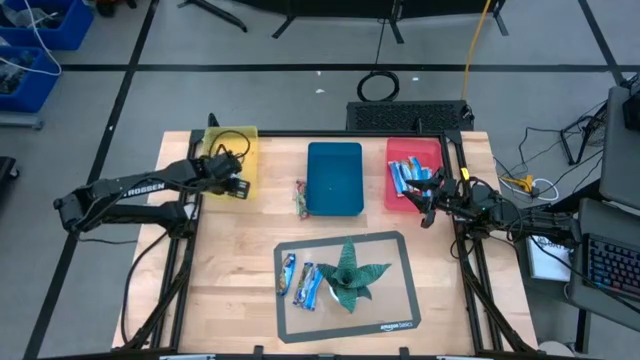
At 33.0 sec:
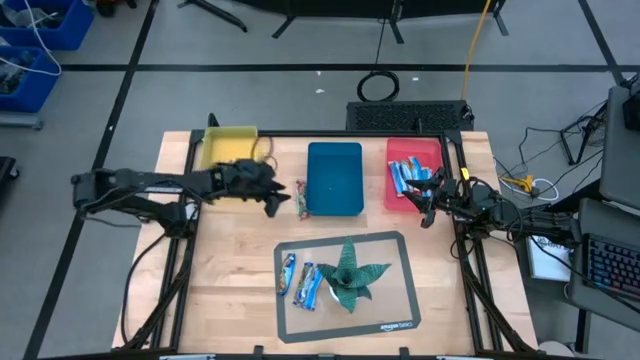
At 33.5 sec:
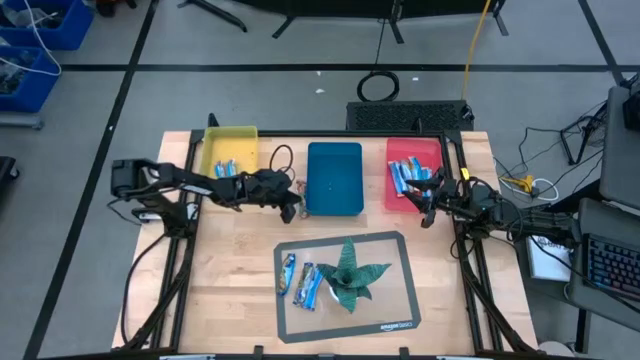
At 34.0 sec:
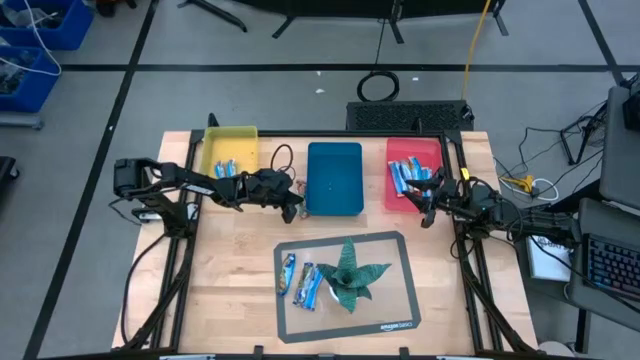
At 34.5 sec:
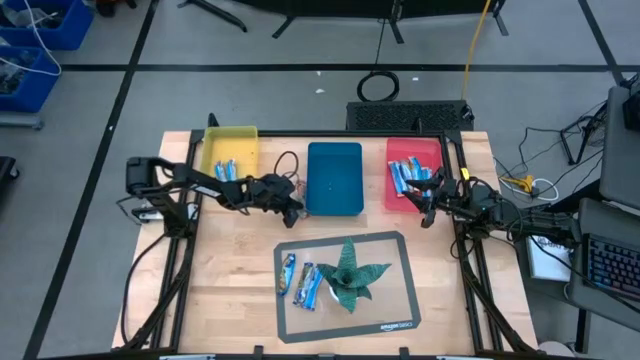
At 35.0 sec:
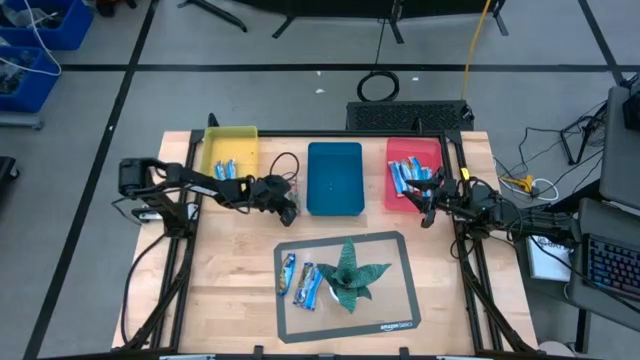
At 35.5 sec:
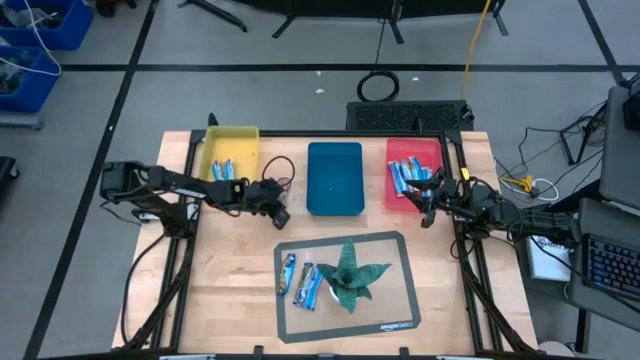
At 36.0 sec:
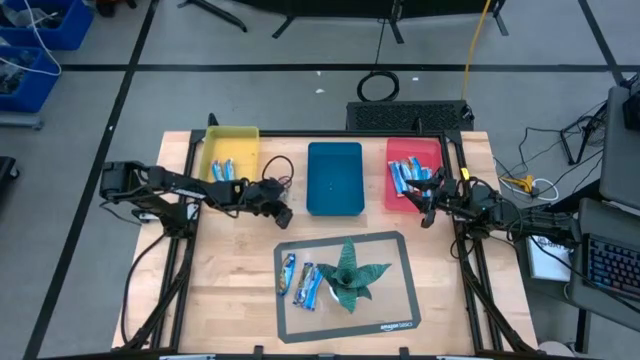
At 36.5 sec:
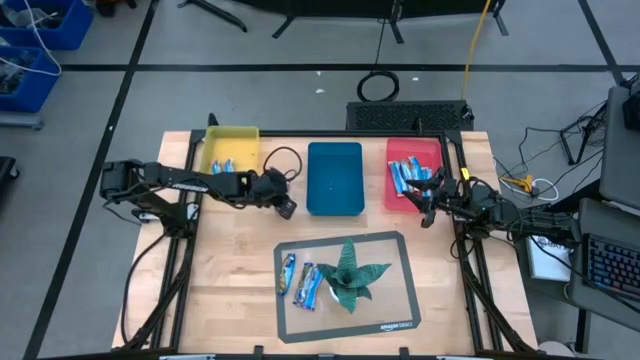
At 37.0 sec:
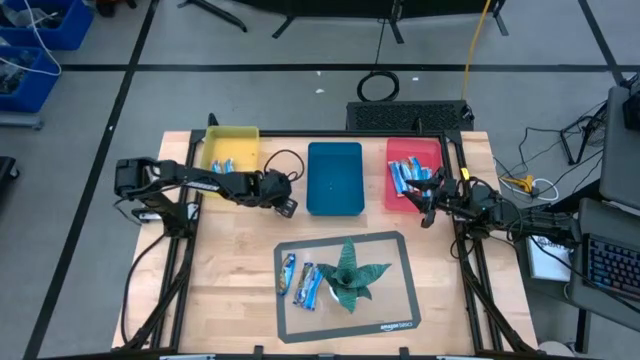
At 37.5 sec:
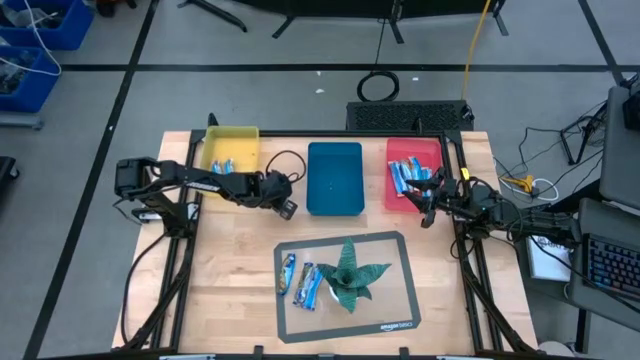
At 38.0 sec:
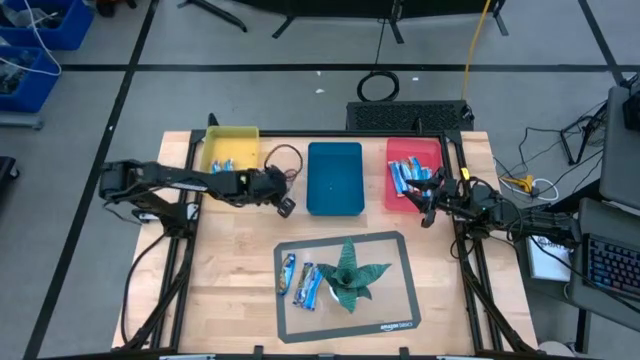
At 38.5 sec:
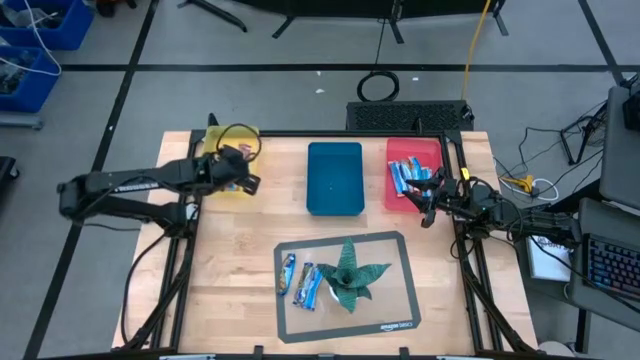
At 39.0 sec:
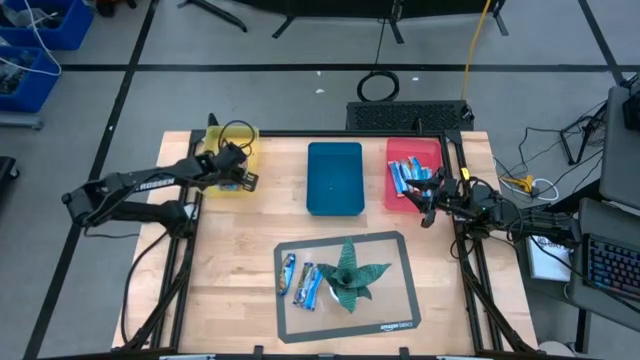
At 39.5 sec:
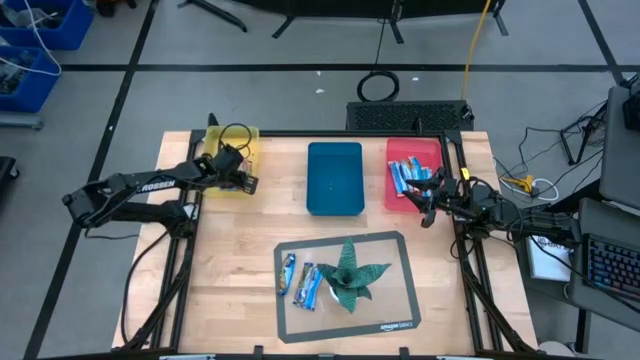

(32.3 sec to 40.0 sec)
Task: Pick and place Granola Bars by type
Put the red granola bar into the yellow bin

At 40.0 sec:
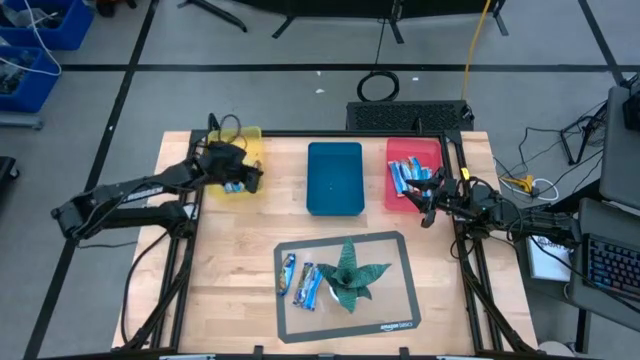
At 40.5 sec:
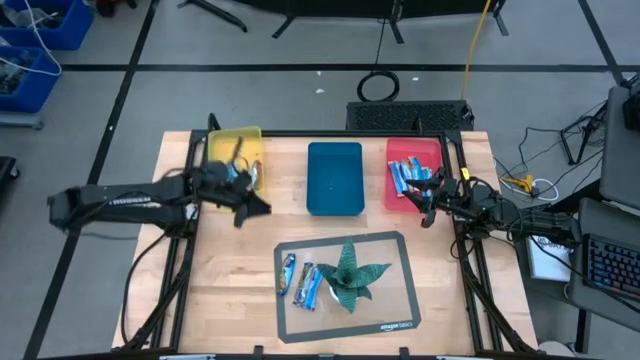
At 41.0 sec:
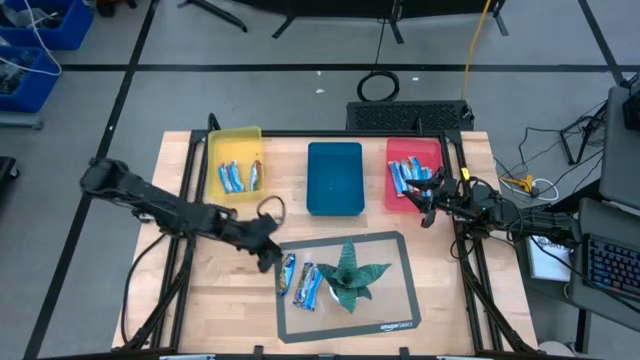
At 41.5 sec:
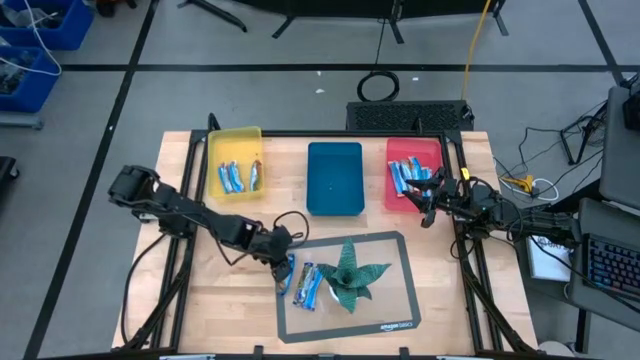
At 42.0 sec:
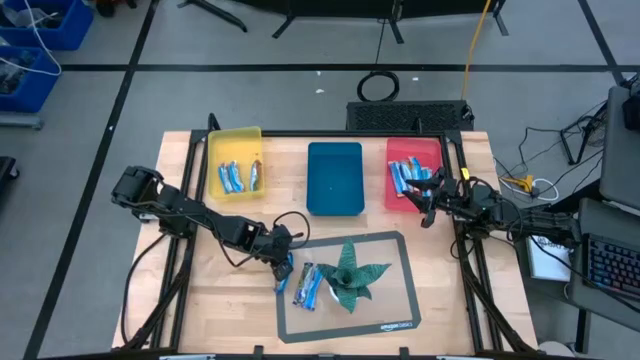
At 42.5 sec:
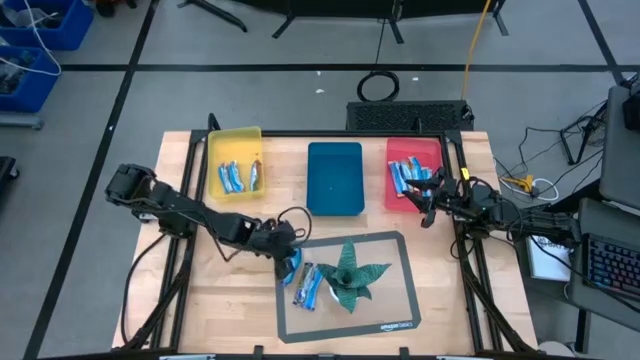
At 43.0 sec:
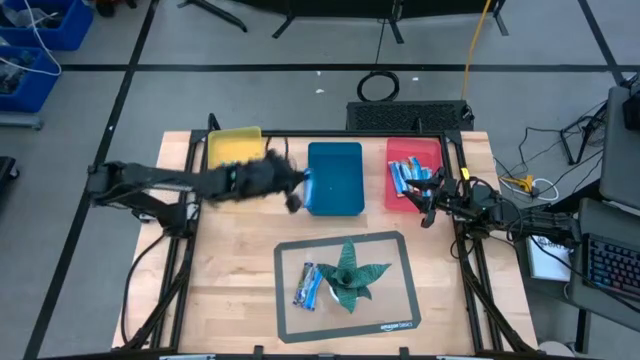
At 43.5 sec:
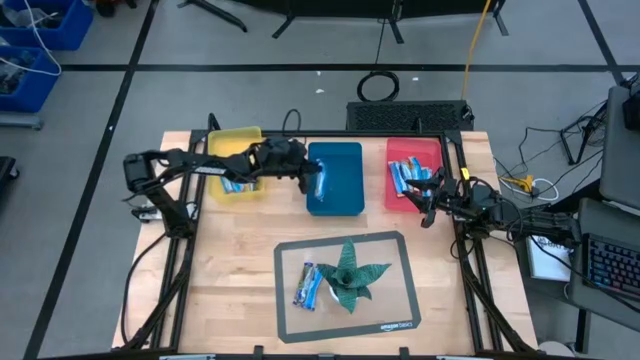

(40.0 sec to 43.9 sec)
Put the blue granola bar into the blue bin

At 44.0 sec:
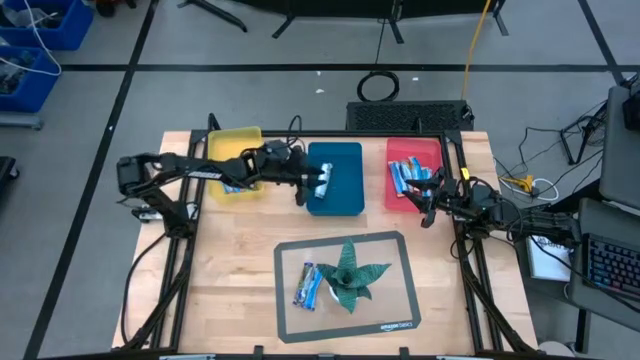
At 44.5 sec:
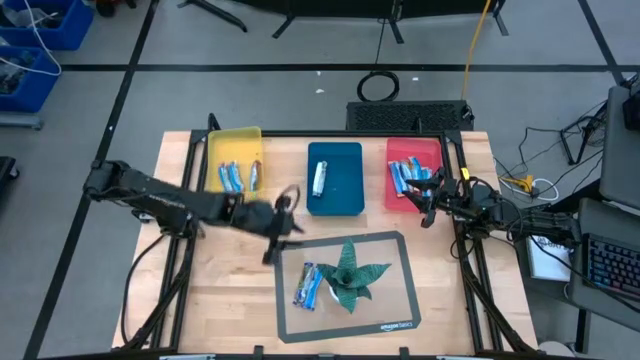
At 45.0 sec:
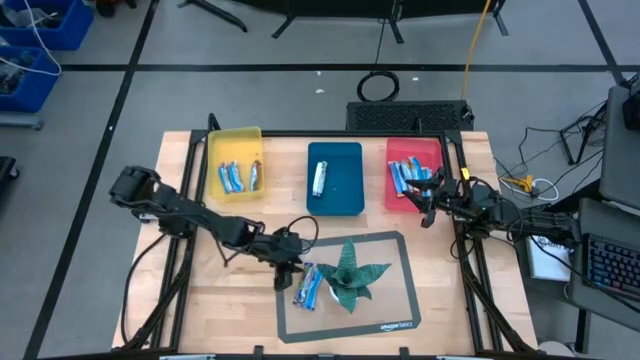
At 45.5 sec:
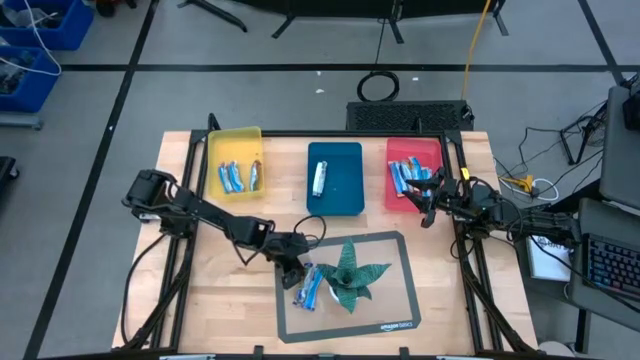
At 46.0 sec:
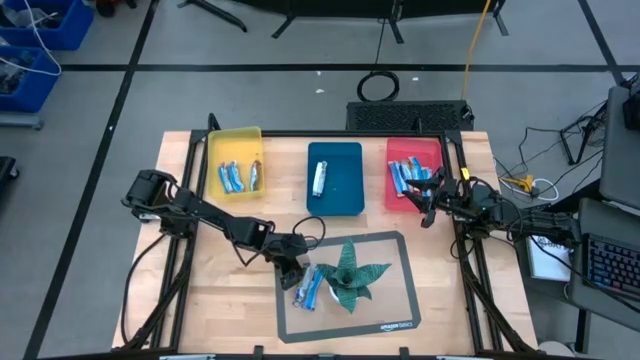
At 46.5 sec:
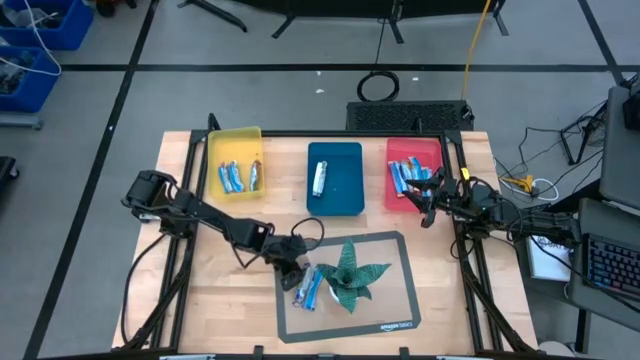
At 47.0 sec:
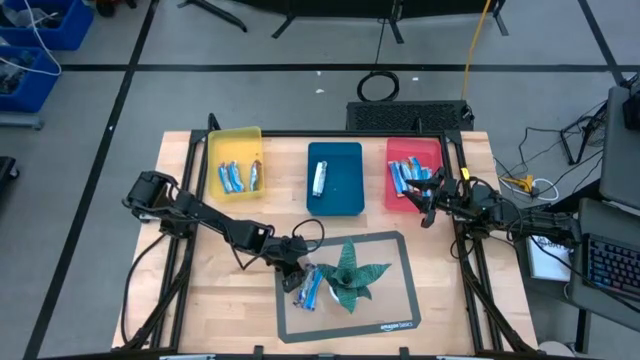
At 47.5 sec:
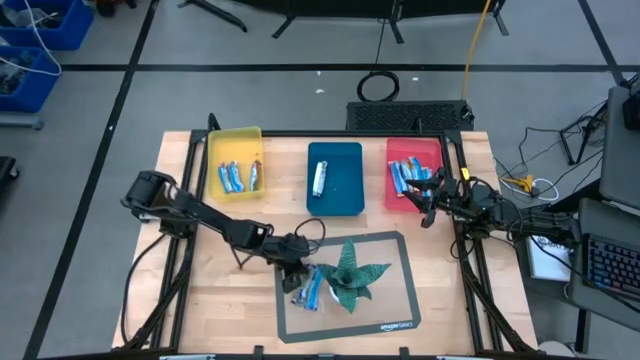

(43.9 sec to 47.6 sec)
Put the blue granola bar into the blue bin

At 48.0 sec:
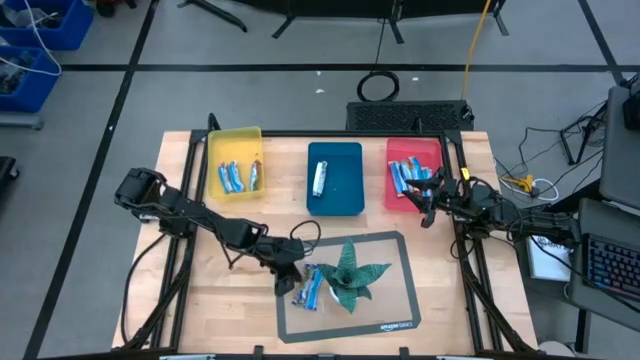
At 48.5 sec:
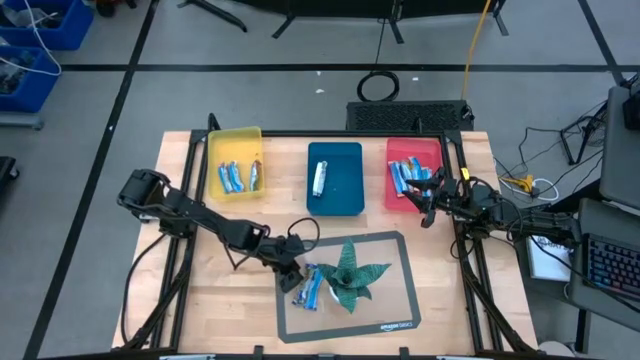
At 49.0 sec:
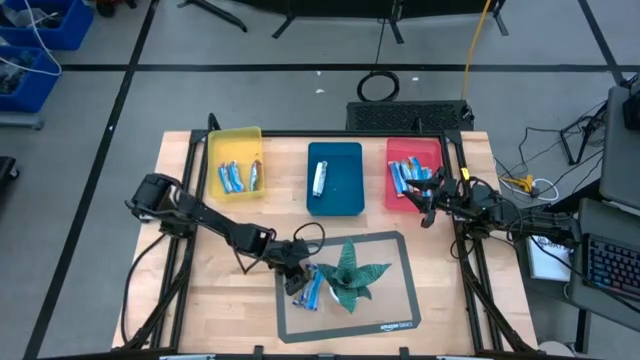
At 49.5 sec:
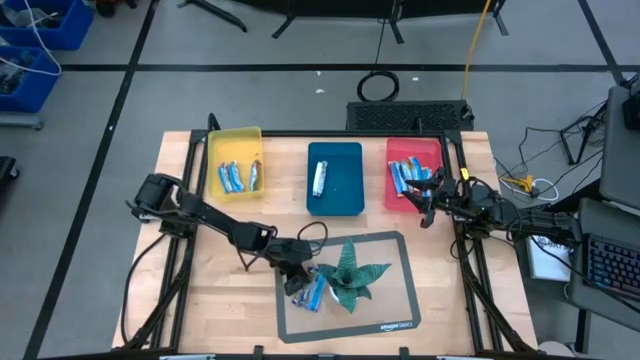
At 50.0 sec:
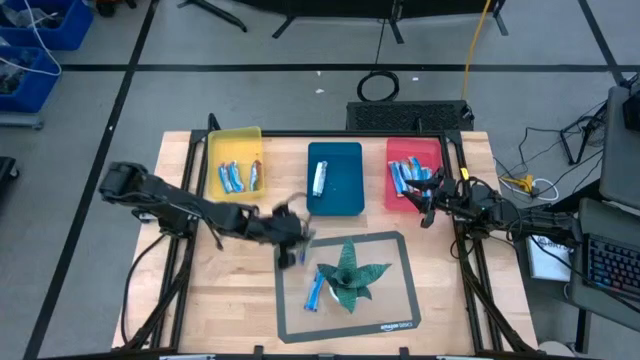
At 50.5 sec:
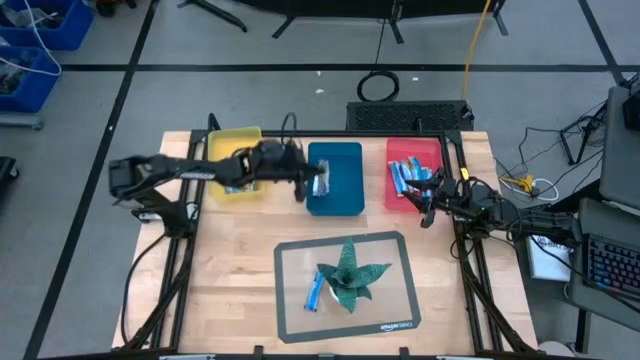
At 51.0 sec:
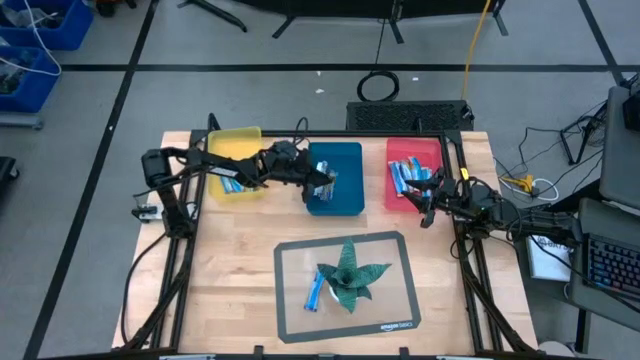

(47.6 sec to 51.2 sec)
Put the blue granola bar into the blue bin

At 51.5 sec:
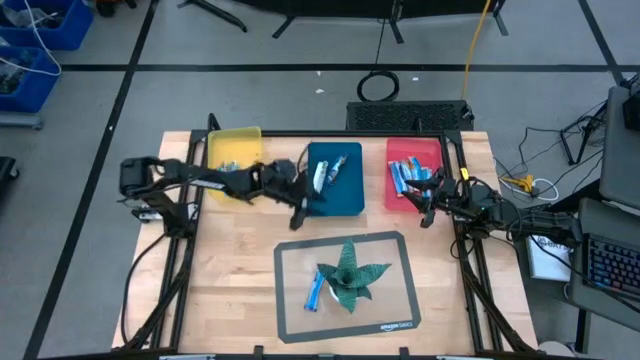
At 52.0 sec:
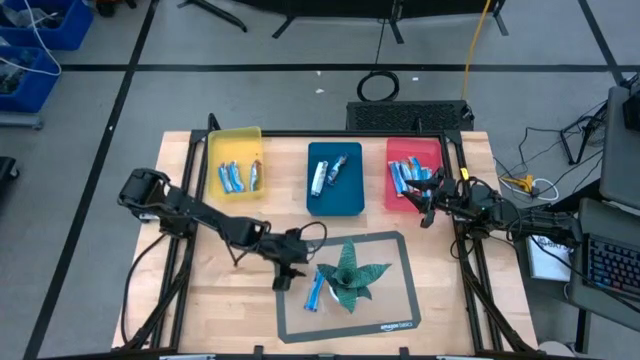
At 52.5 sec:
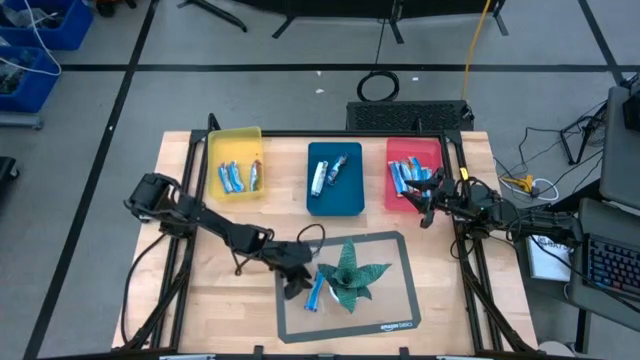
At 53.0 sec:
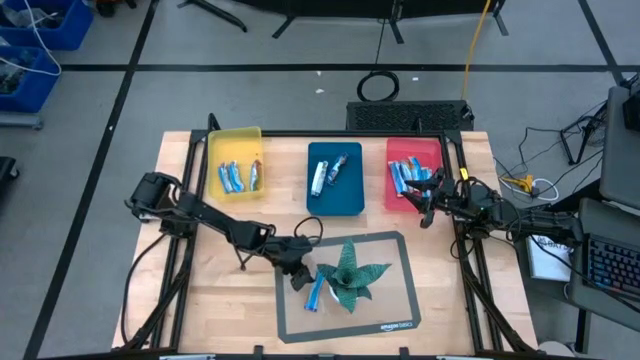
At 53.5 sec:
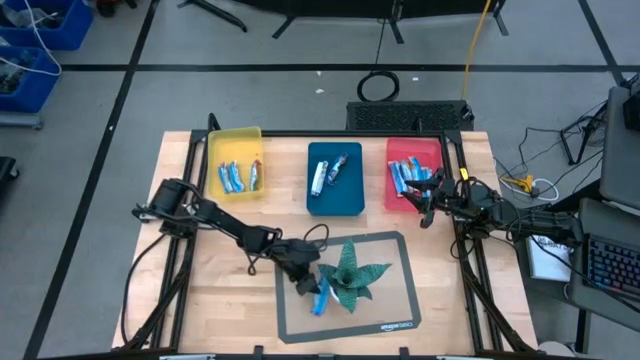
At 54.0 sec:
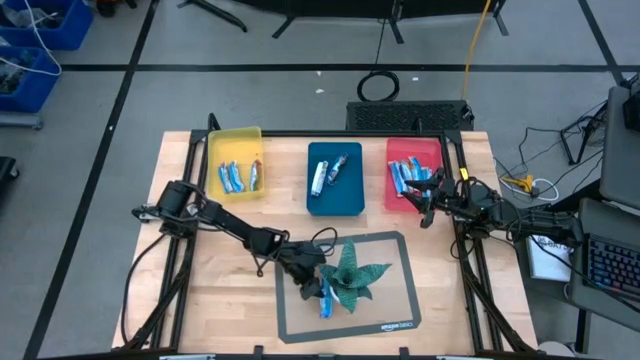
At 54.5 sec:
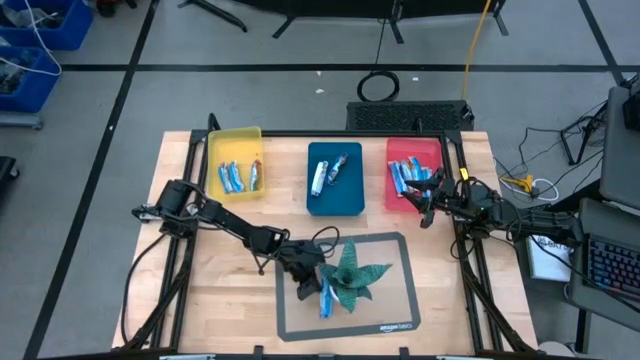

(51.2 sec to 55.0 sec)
Put the blue granola bar into the blue bin
